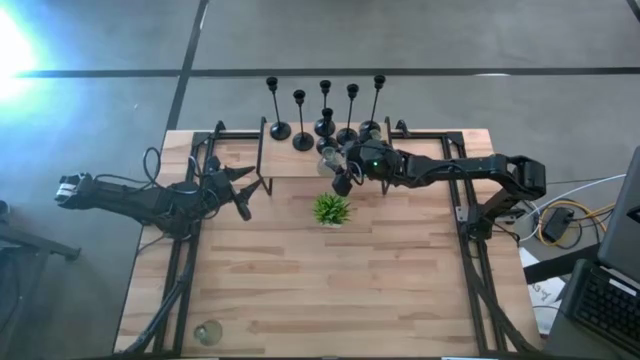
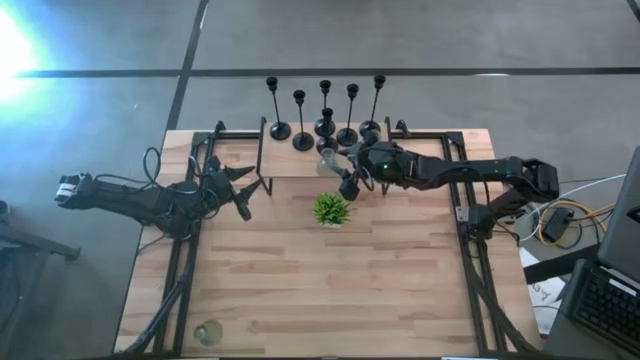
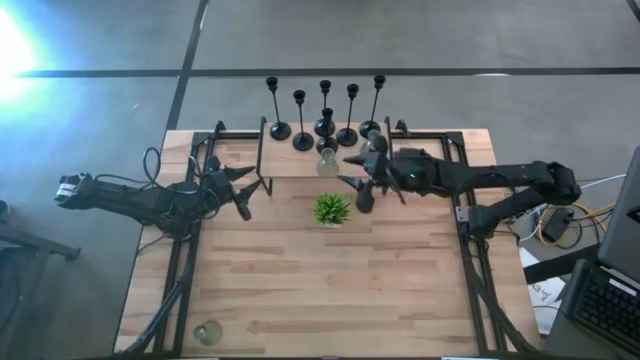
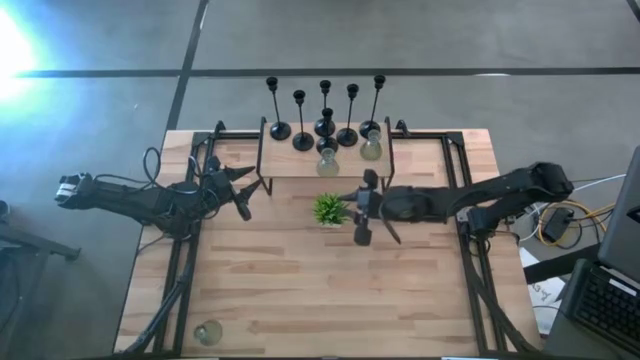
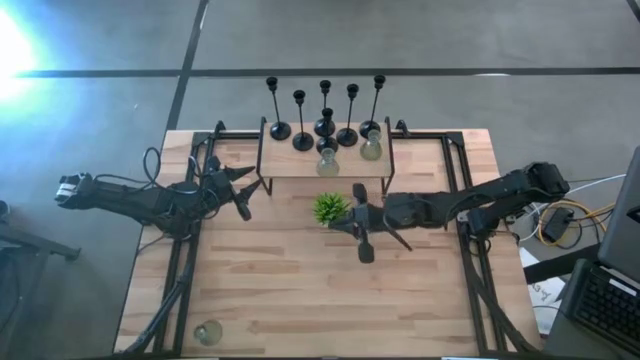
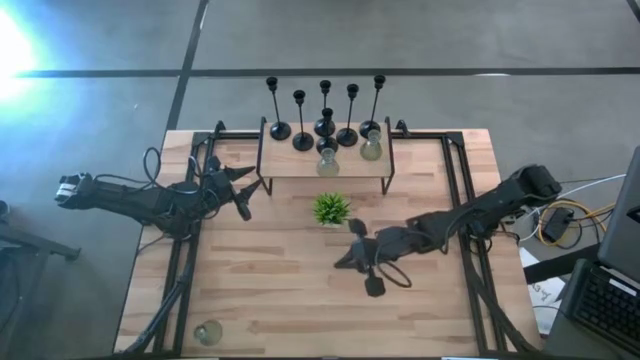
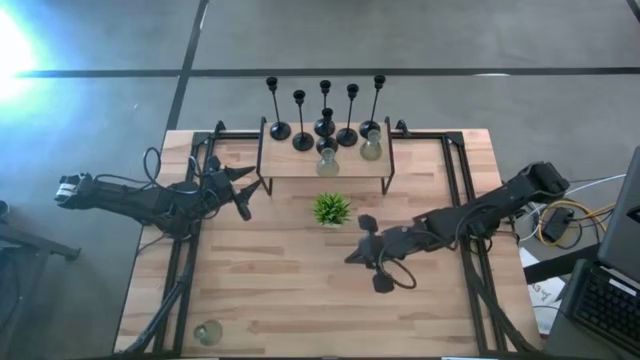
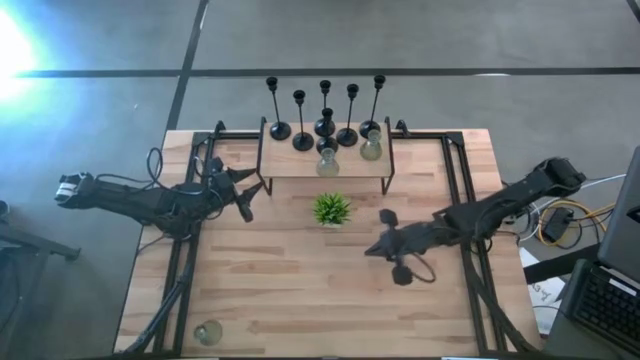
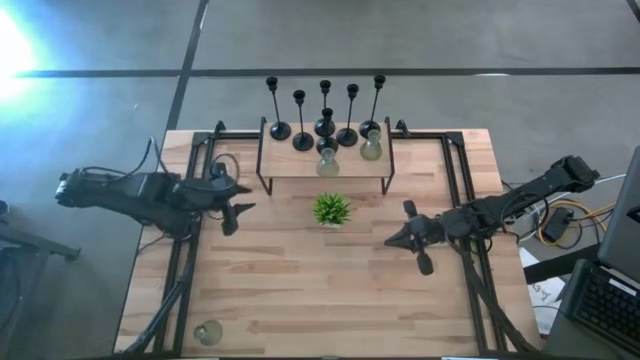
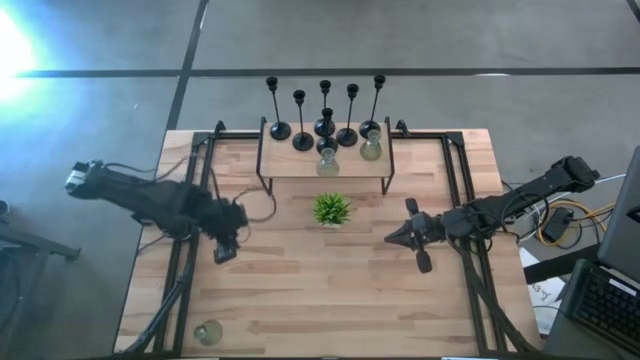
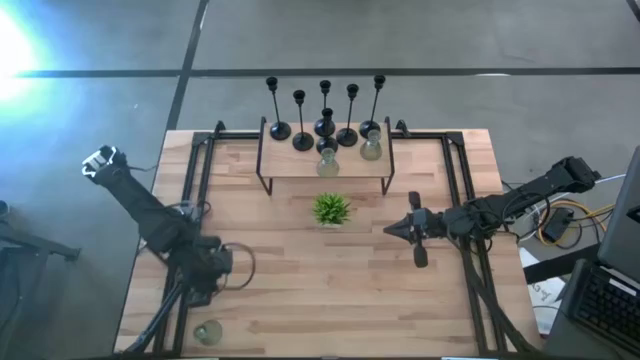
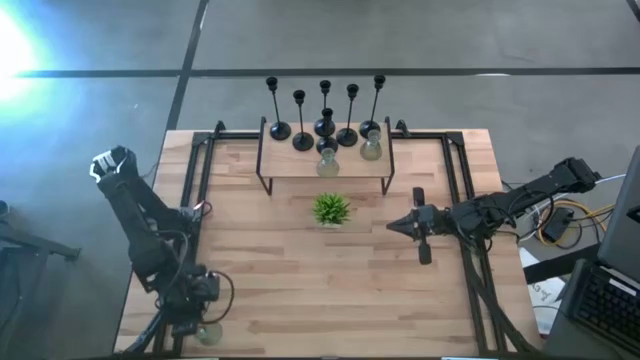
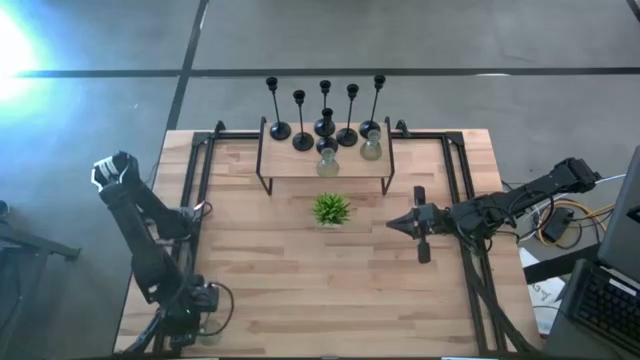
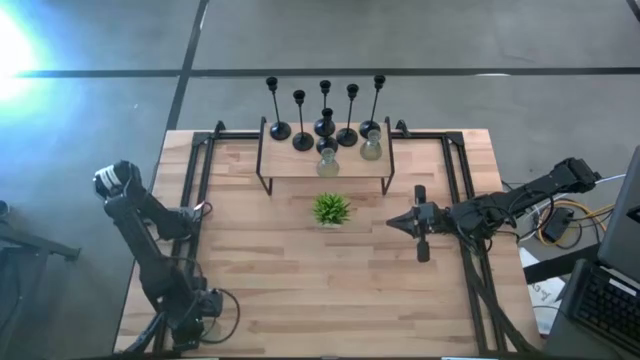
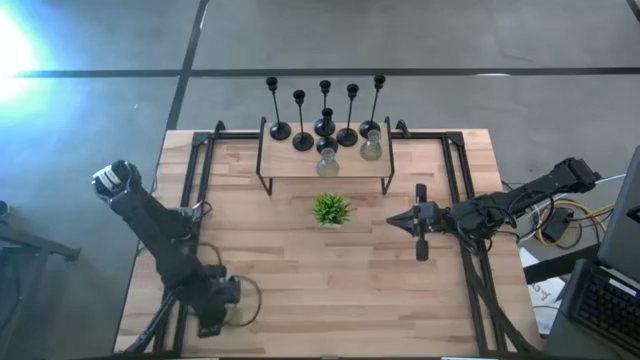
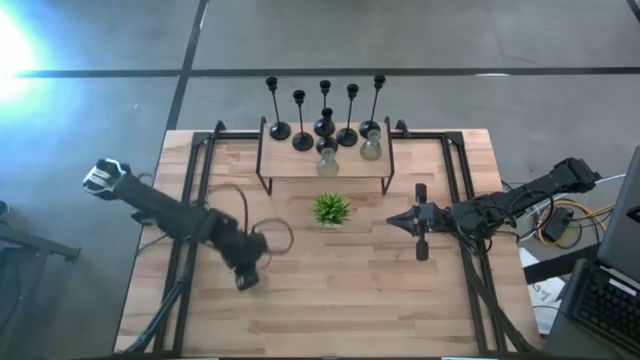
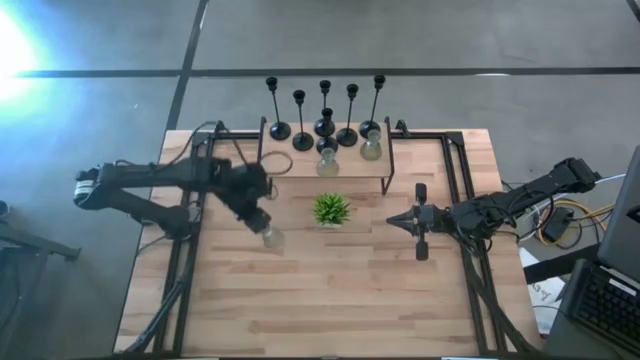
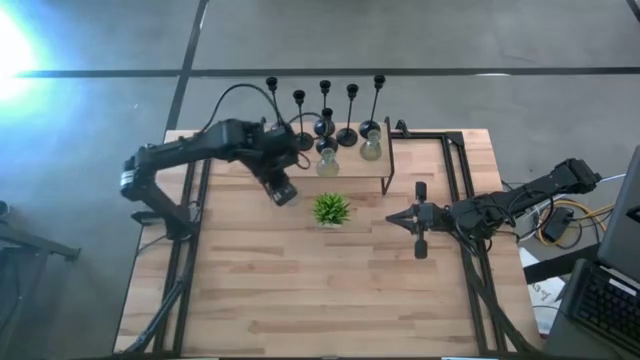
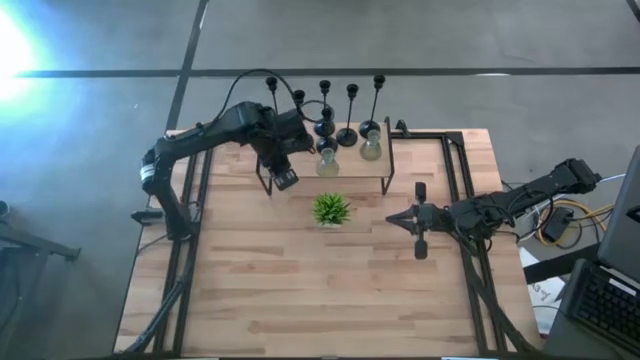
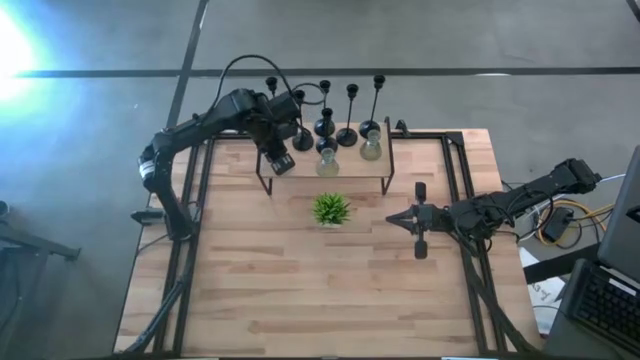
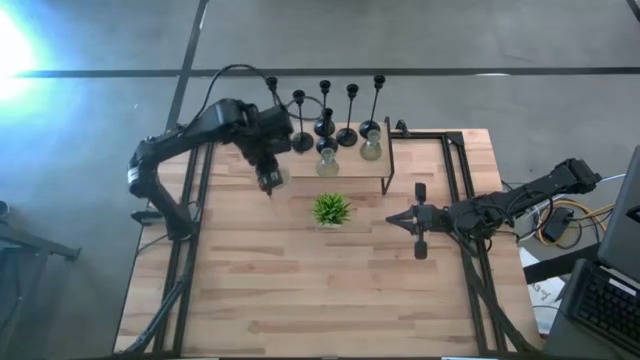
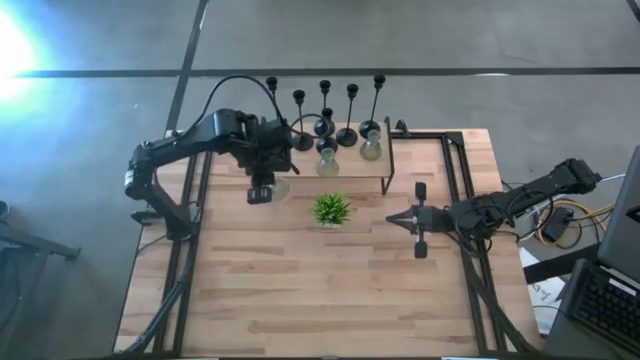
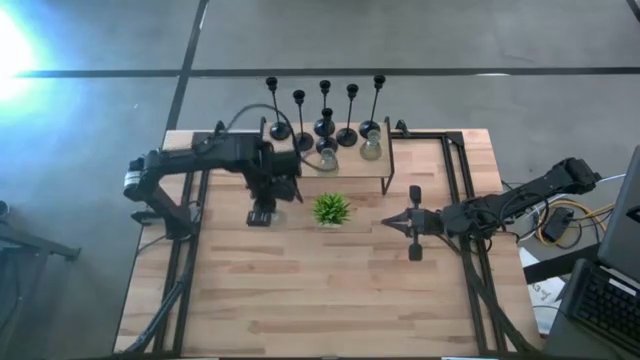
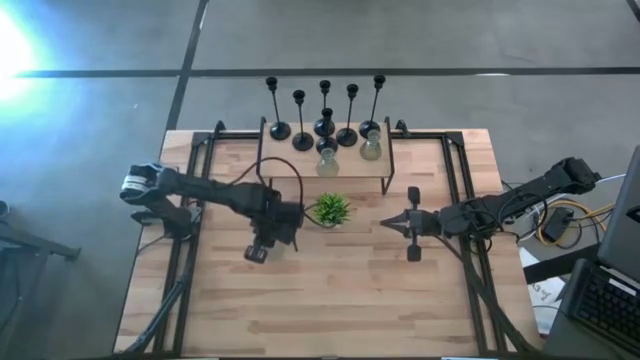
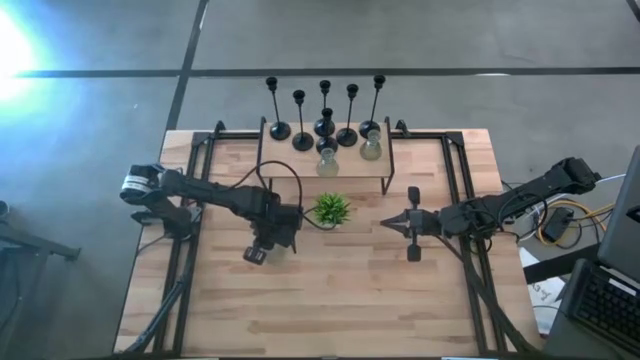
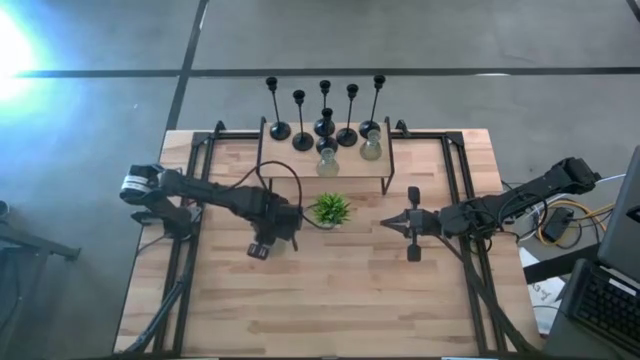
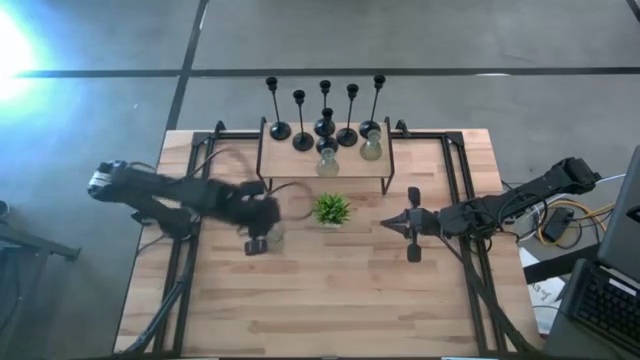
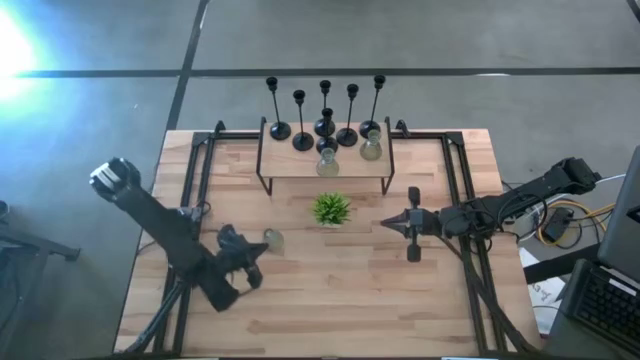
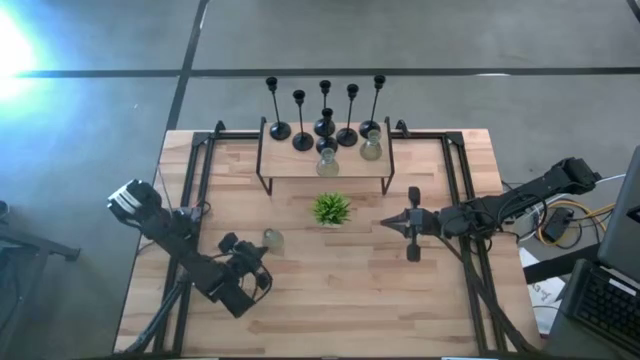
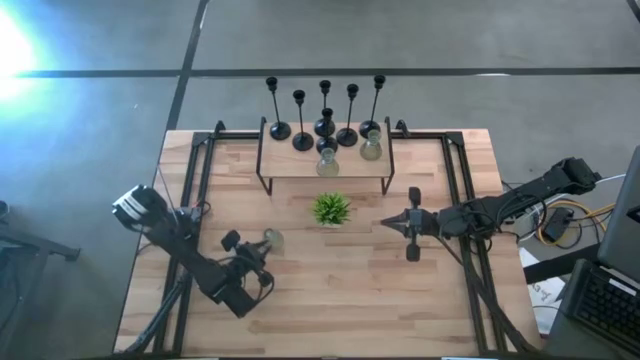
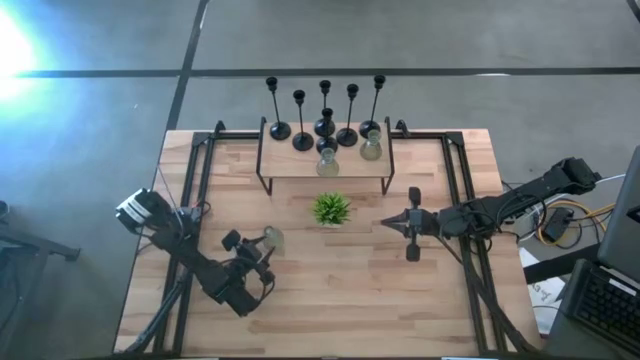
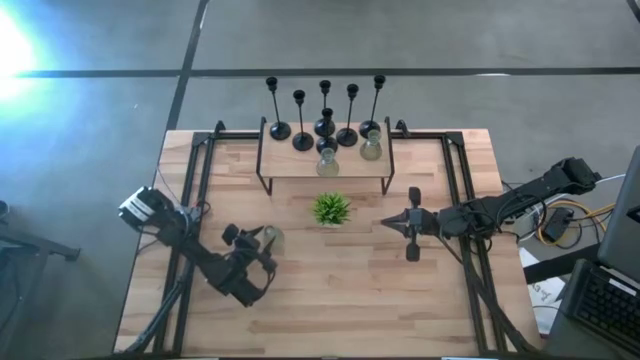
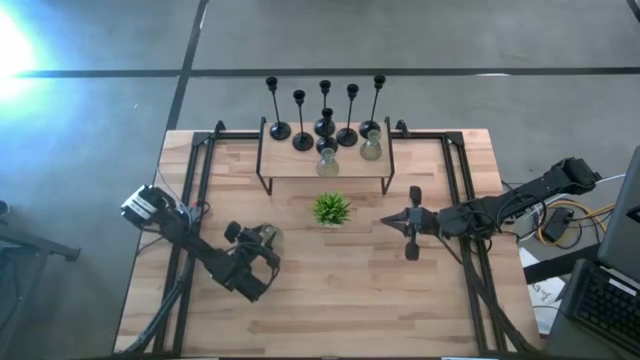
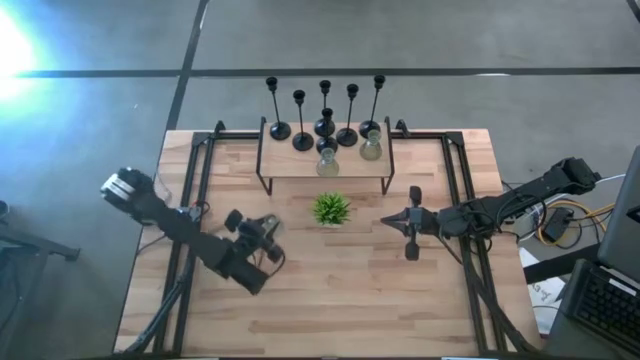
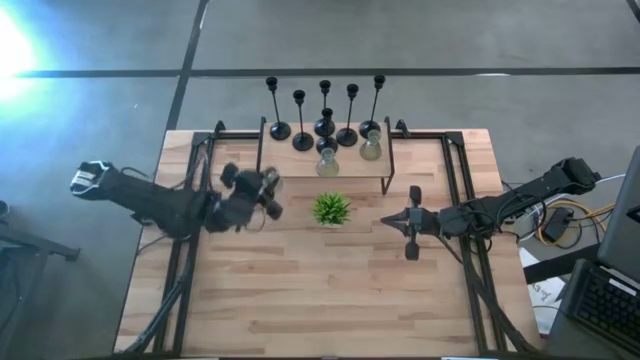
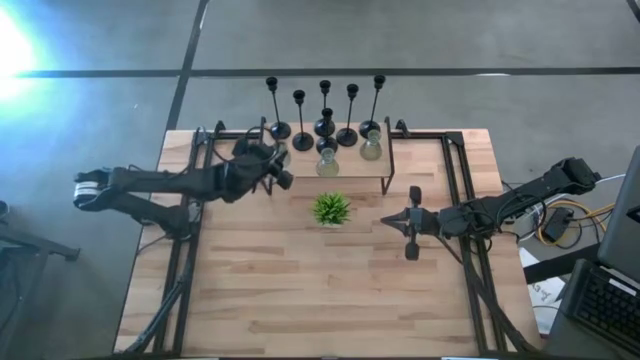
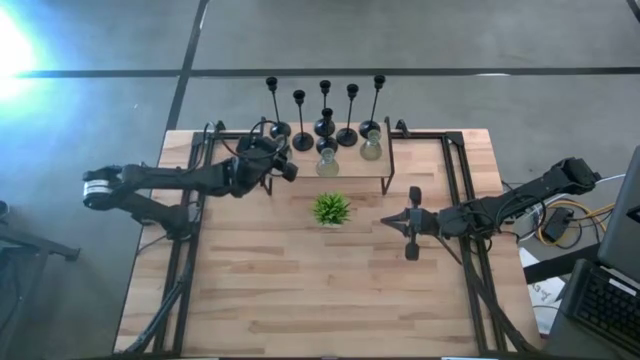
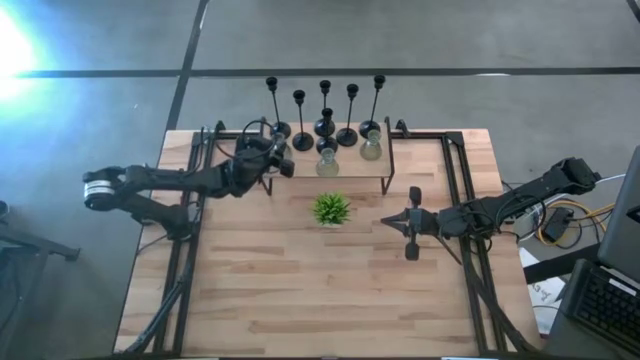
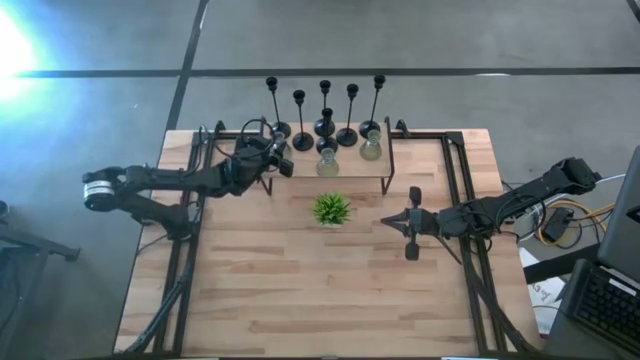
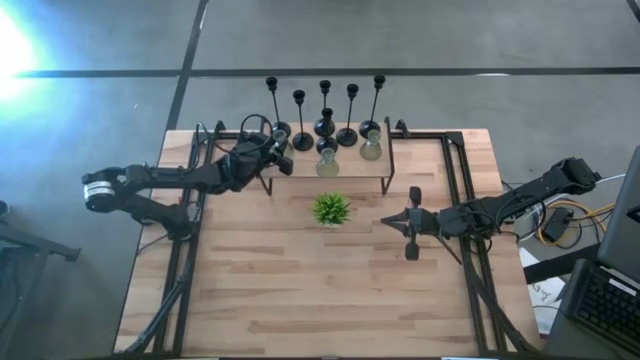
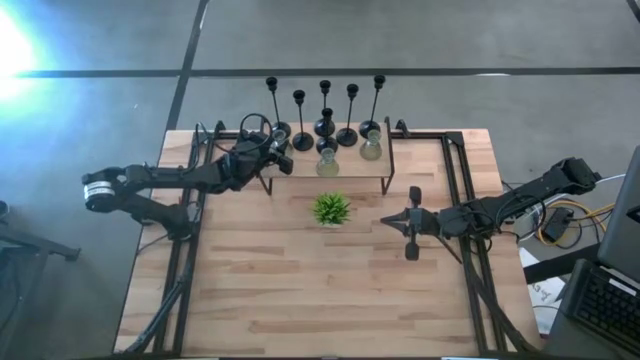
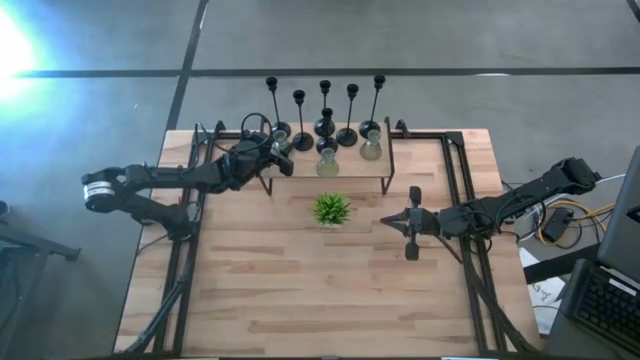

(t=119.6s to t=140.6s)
Task: Pick & Place candle stick holders
Put the transparent glass candle holder on the shelf

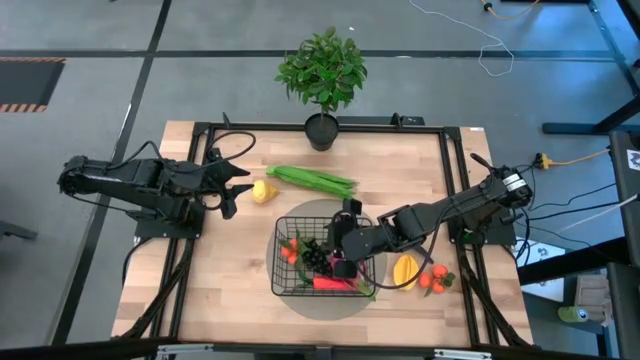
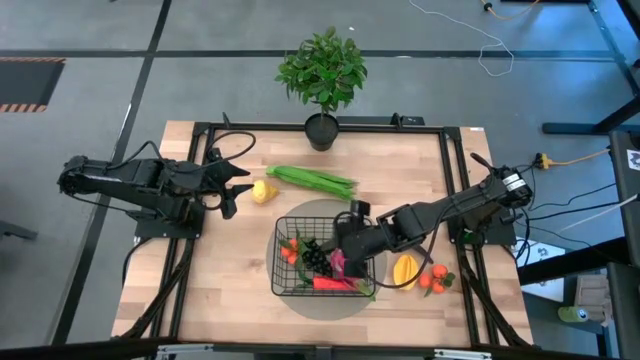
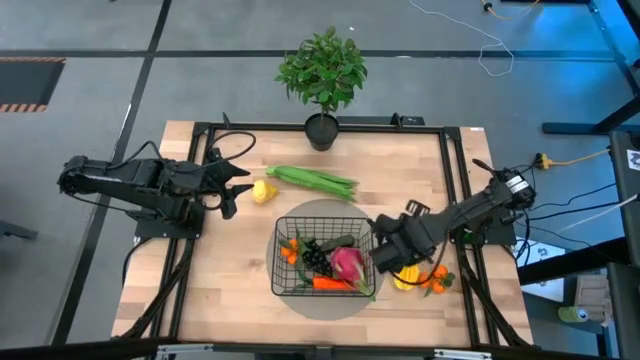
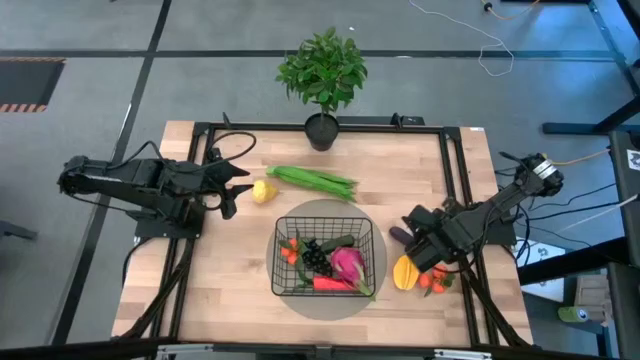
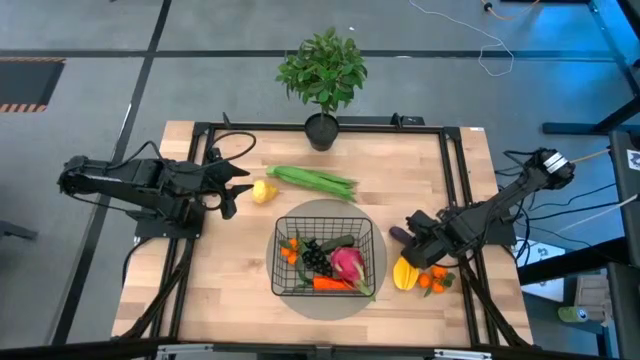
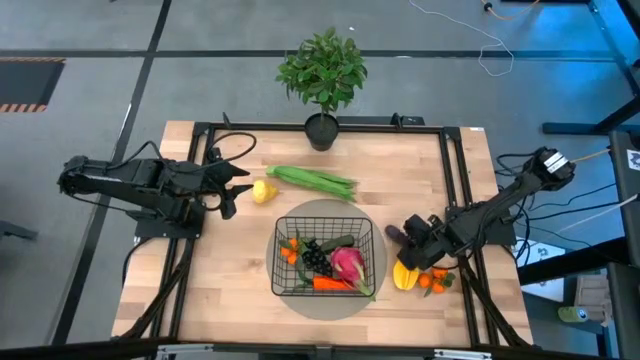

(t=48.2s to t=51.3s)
Task: Build produce basket
Put the eggplant into the black wire basket
